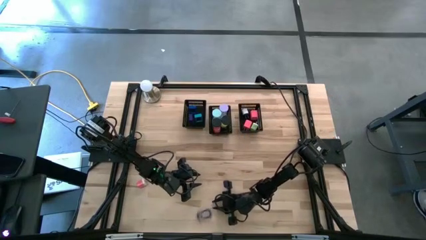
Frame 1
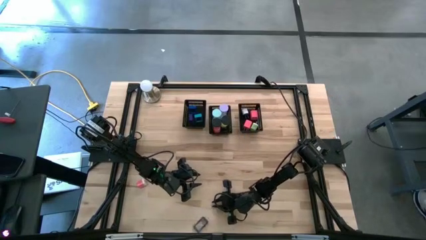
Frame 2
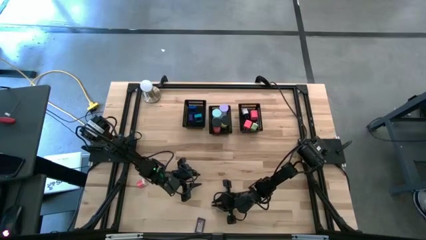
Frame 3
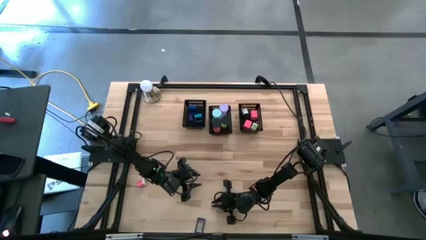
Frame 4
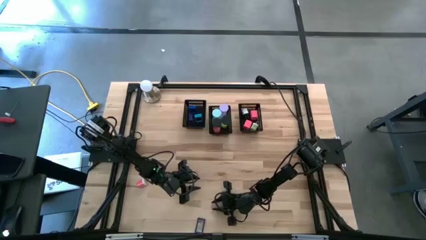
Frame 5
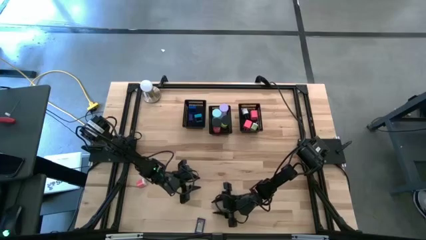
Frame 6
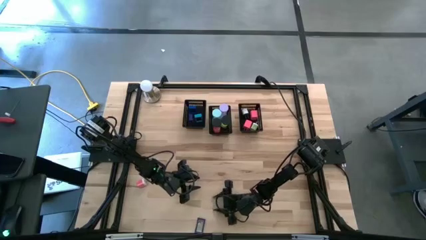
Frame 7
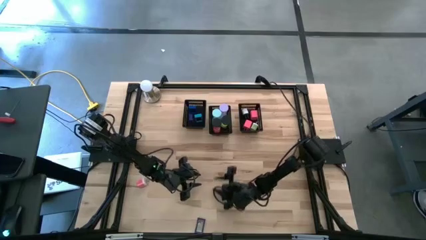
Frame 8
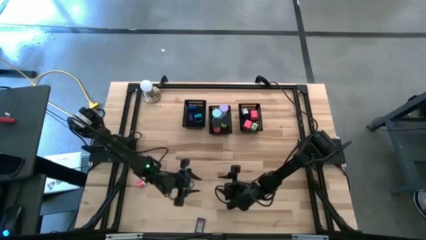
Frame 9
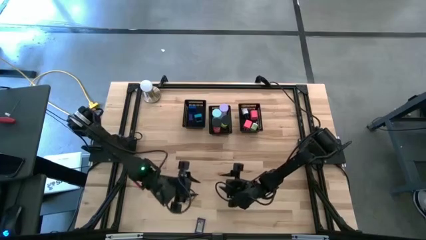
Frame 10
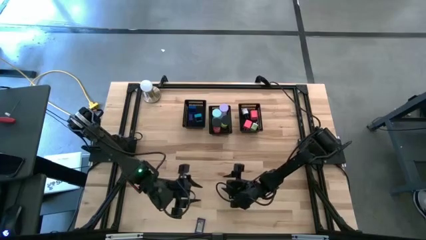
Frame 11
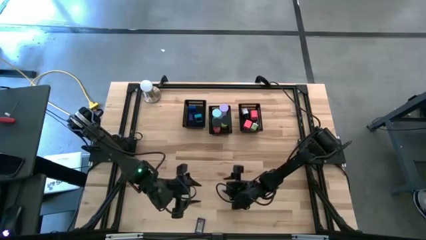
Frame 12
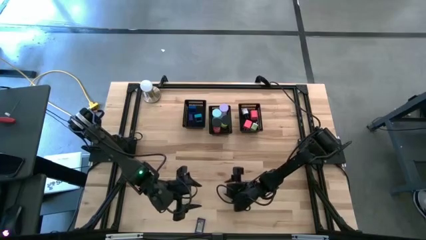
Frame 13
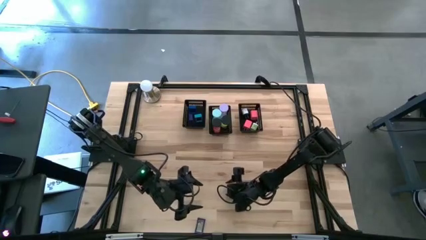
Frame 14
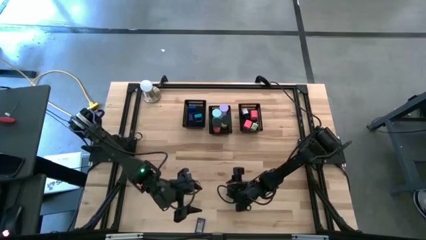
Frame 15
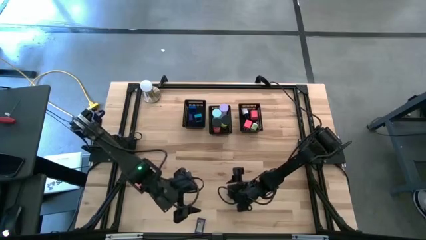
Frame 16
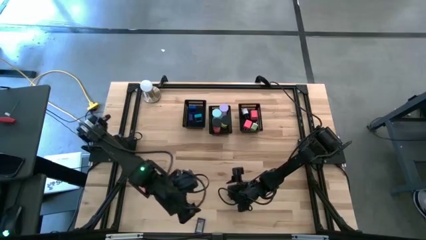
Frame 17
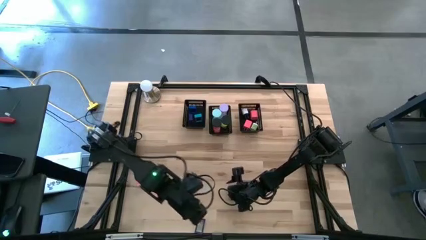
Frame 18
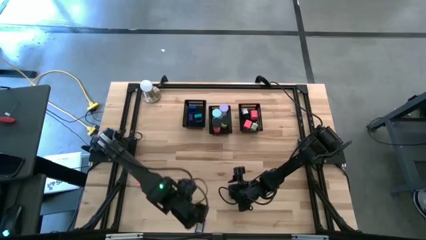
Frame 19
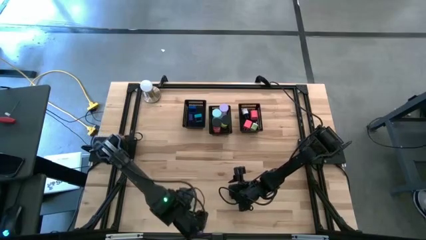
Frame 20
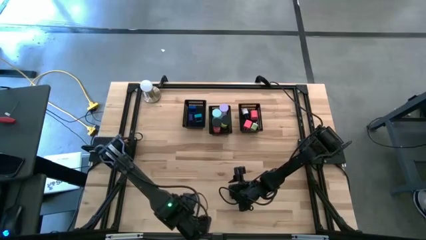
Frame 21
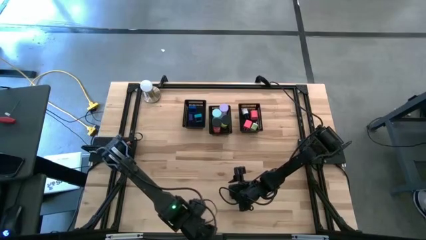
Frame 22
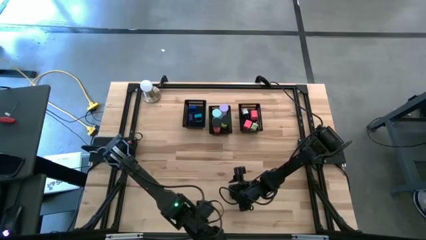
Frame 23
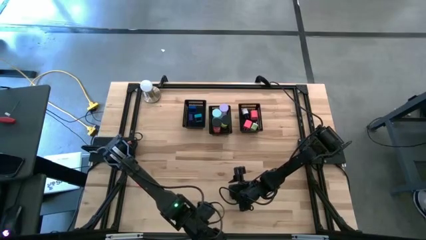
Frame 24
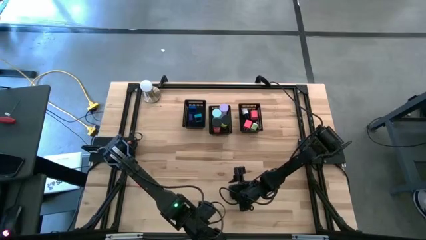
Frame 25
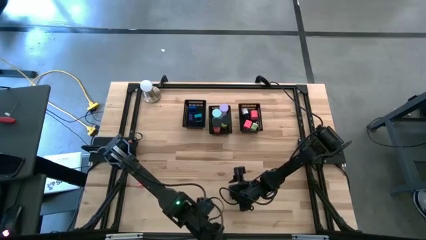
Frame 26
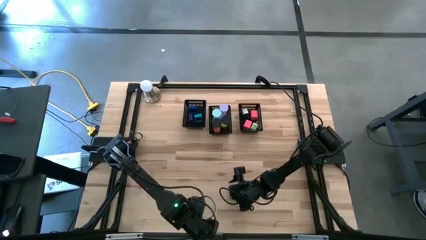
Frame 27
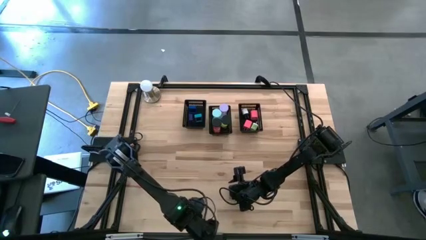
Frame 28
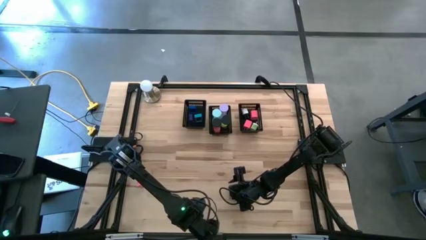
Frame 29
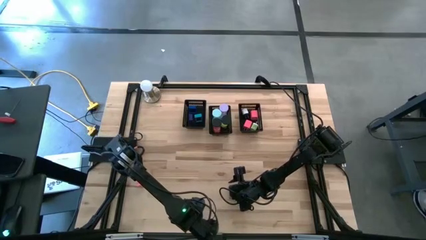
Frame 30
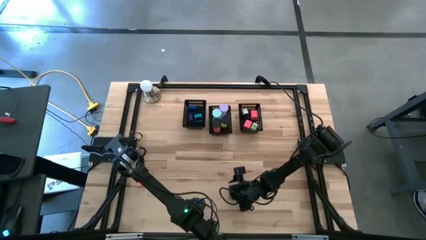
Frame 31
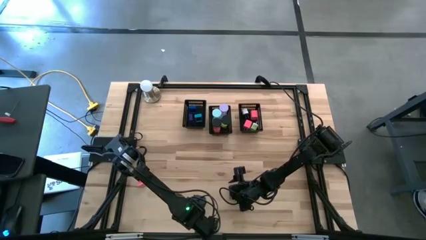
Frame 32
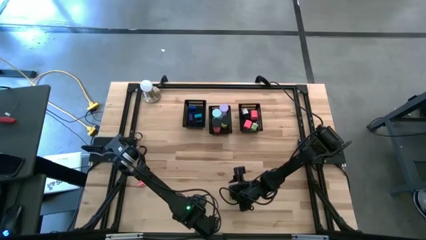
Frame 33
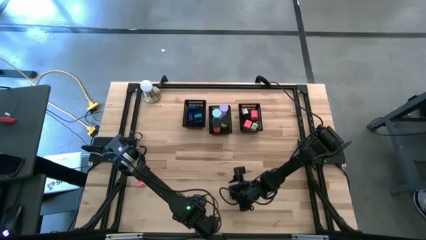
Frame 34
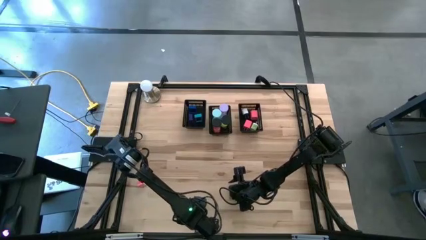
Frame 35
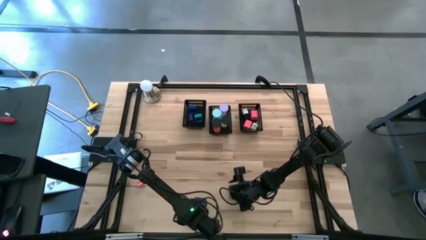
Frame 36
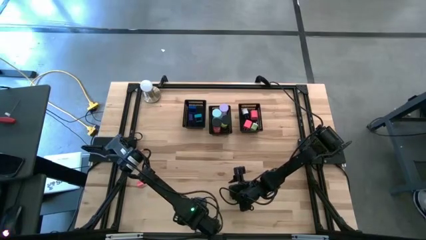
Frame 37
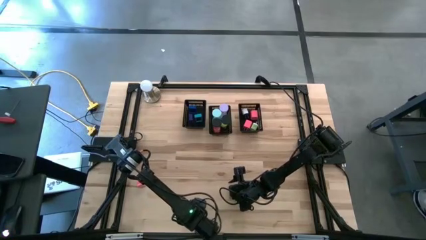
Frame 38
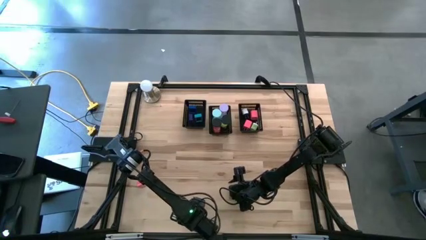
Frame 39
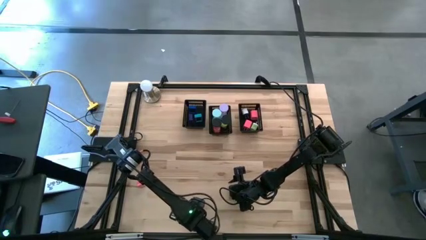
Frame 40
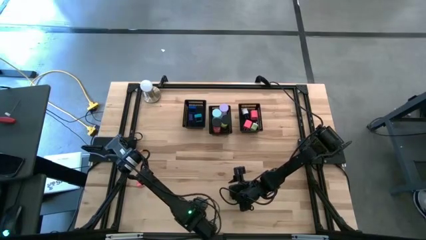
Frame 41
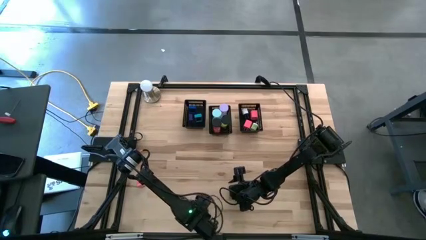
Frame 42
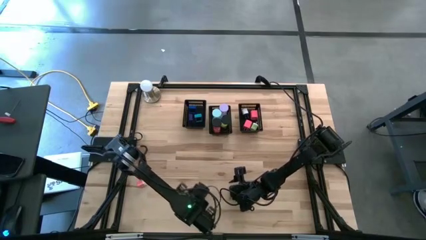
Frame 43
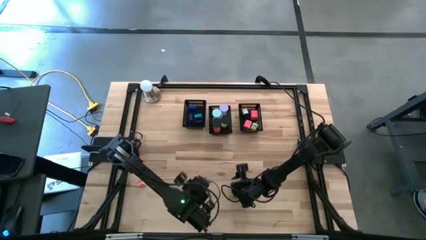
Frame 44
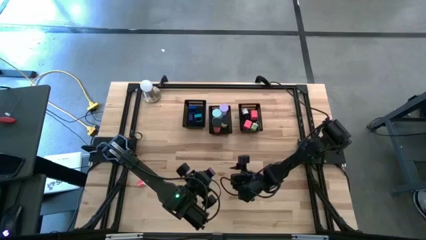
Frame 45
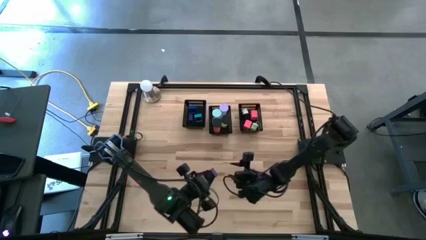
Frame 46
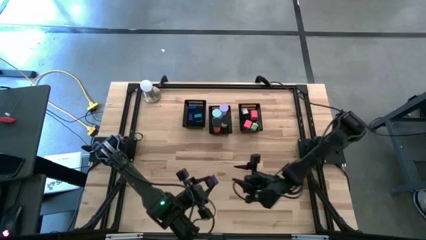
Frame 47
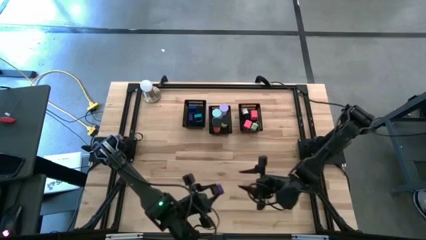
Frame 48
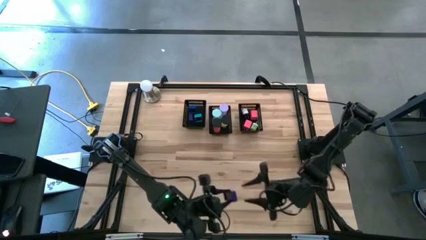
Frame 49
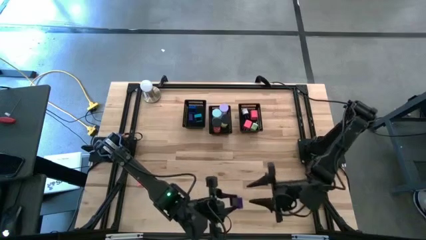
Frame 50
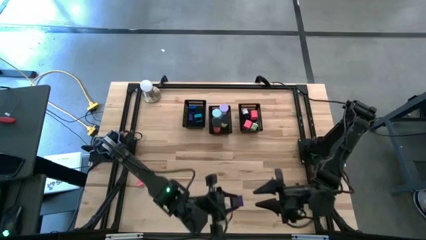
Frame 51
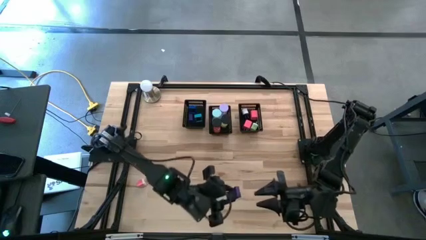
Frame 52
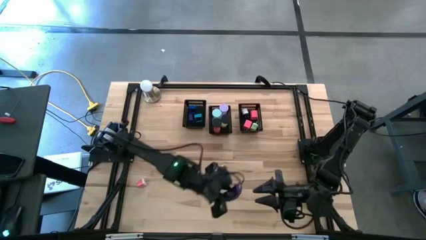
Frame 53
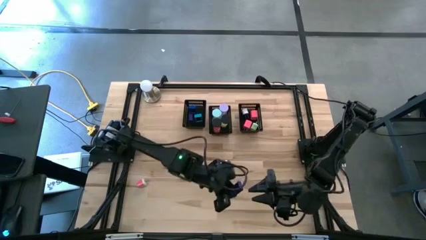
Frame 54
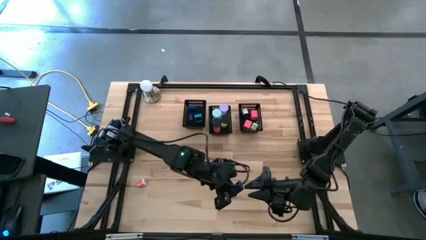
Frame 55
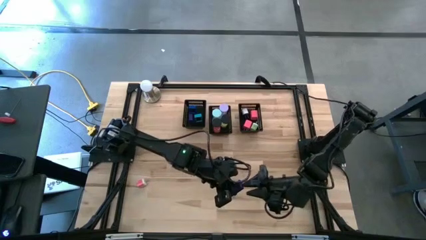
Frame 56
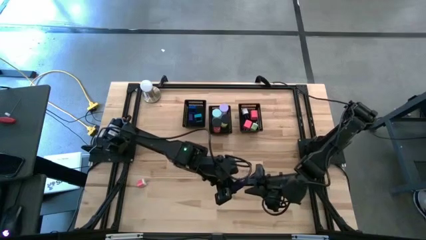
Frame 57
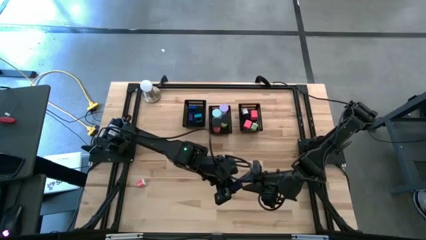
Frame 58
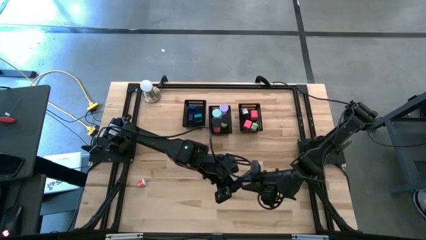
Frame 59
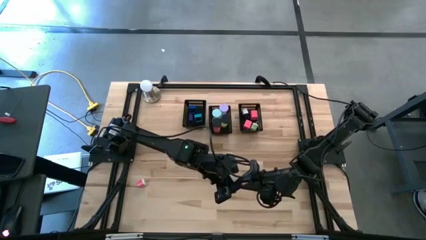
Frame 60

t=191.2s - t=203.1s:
Task: Pick & Place Office items
Put the blue digital clock into the left black bin

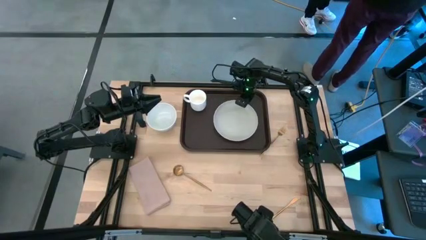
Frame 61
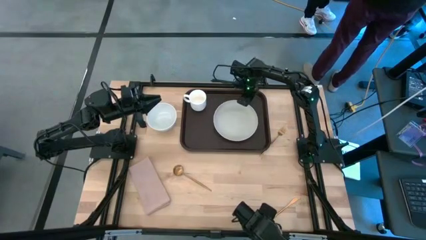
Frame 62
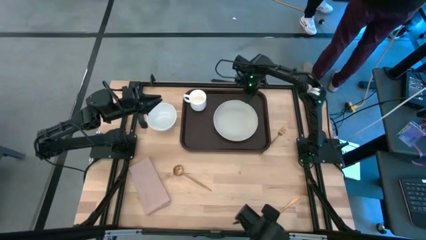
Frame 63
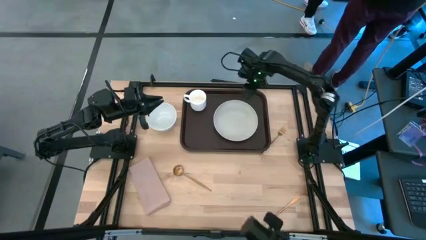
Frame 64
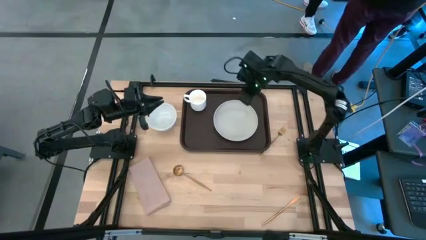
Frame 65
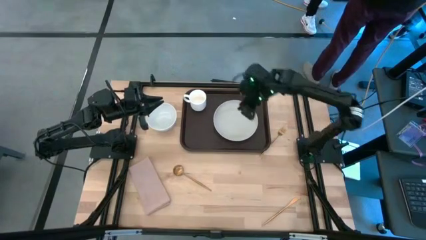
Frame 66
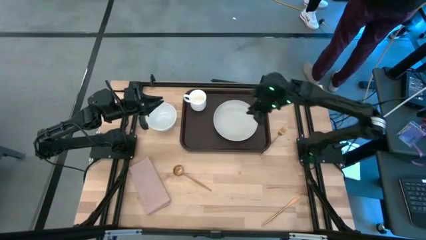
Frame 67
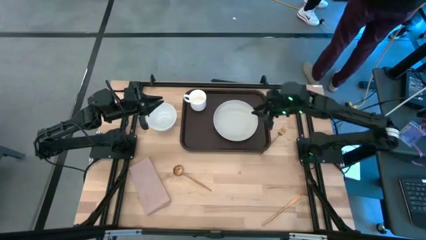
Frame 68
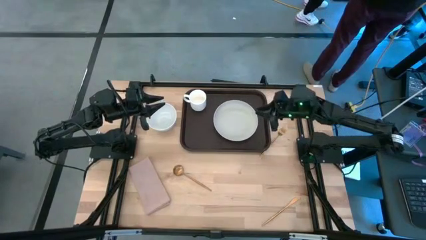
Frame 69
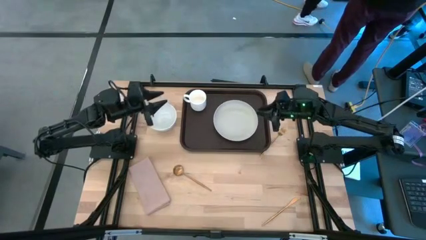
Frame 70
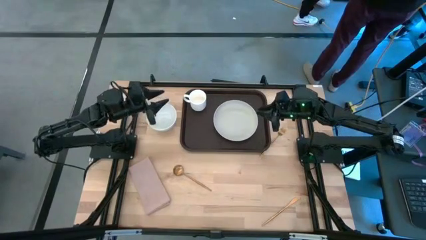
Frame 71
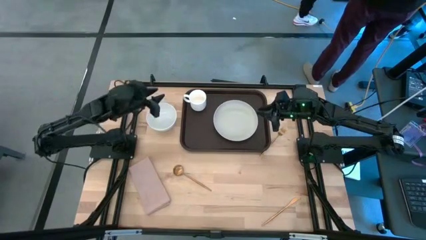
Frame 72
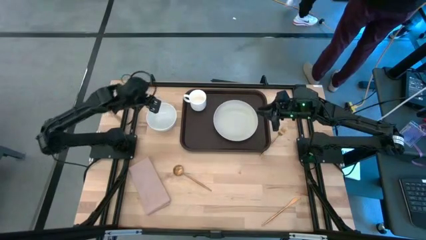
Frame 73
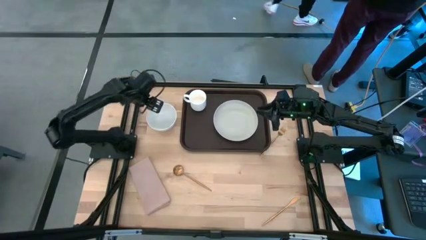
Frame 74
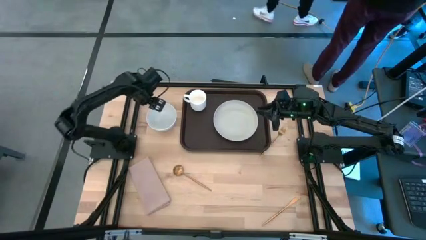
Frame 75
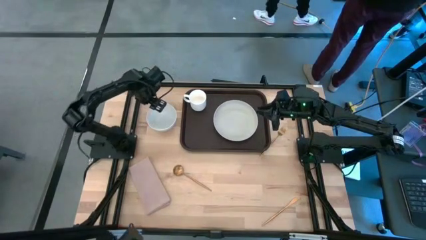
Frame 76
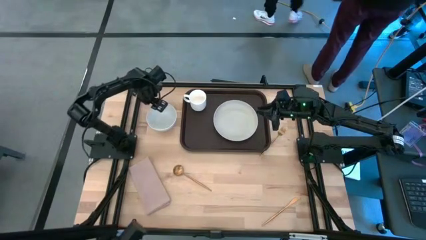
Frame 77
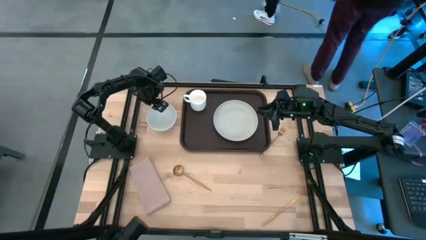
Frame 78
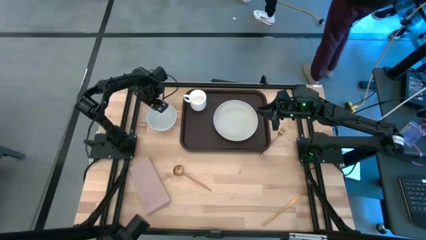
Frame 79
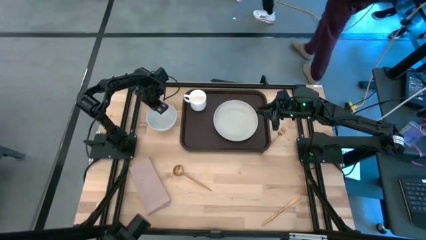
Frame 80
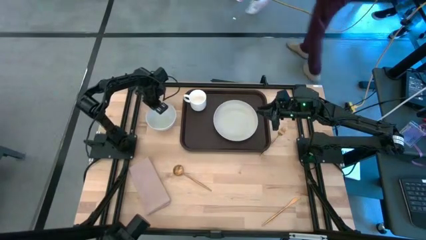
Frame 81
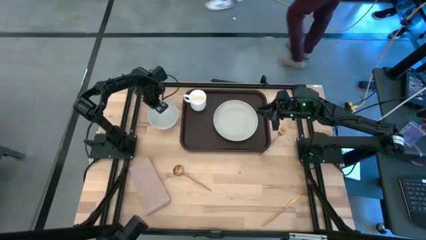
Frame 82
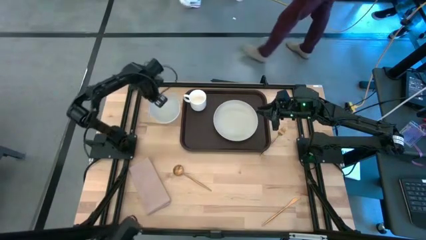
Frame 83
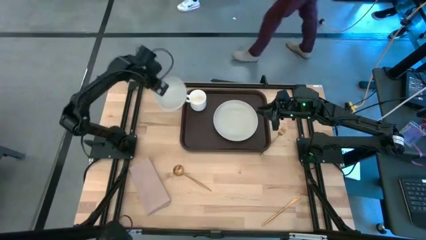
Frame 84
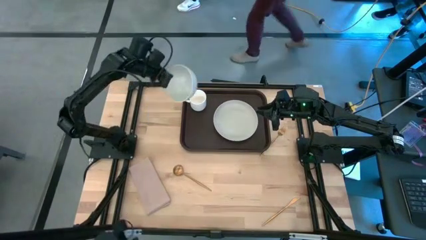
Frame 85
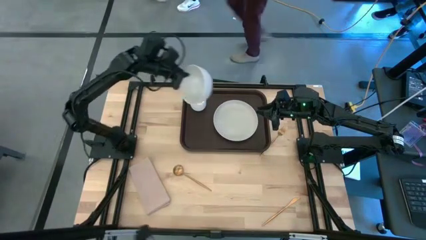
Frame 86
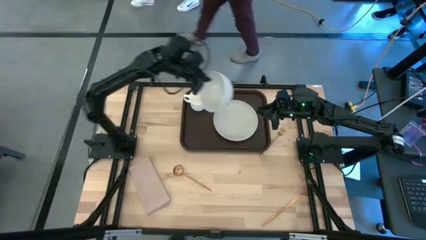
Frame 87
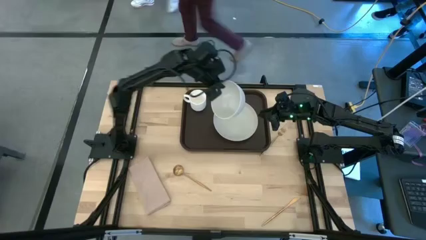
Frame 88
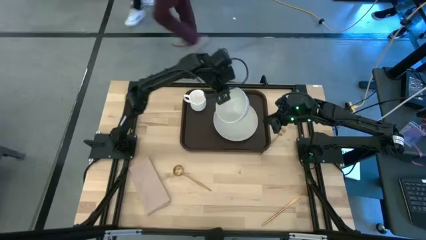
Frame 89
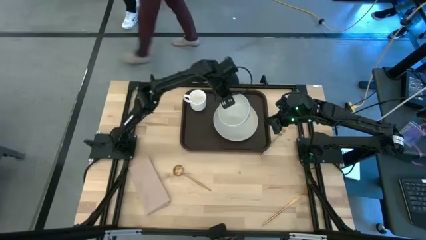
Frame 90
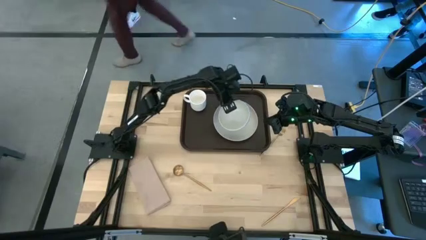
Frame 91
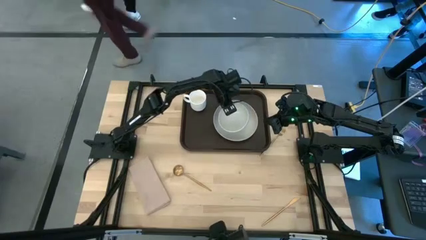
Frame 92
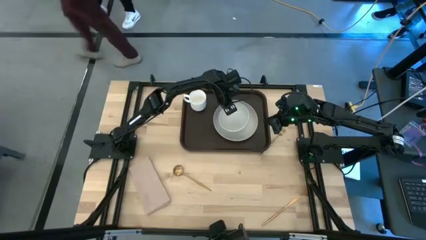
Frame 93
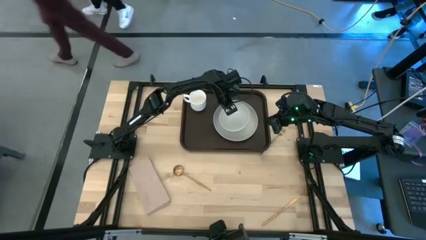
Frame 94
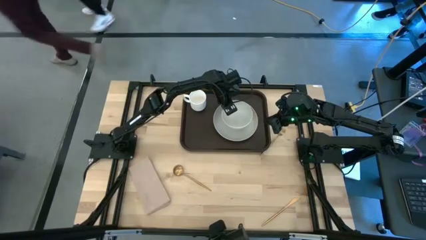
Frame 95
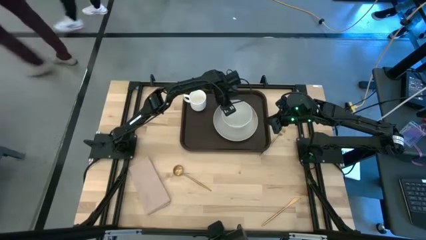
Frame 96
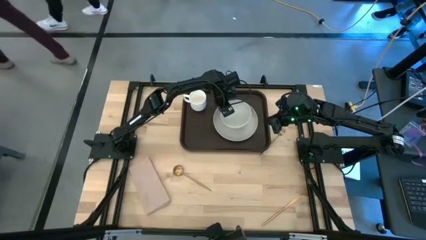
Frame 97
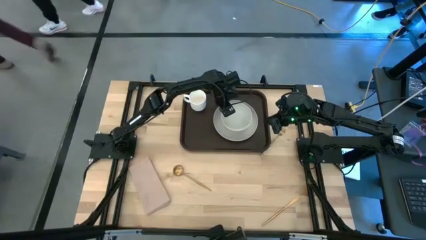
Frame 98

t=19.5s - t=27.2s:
Task: Set up tray
Put the white bowl on the gray plate
